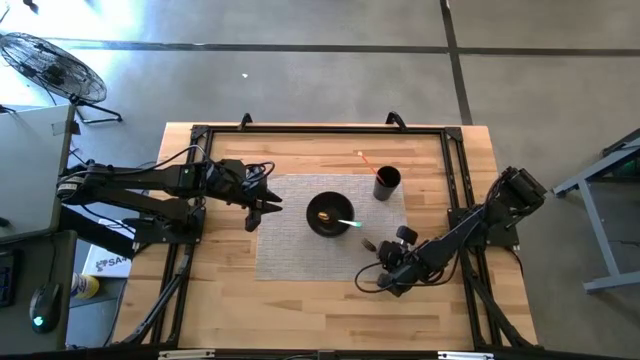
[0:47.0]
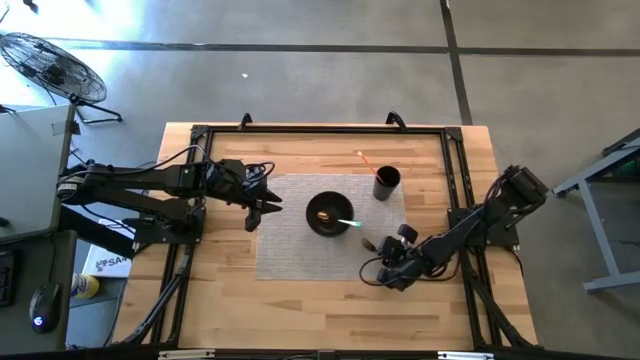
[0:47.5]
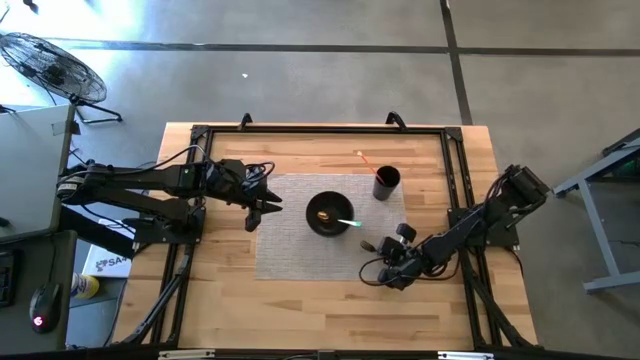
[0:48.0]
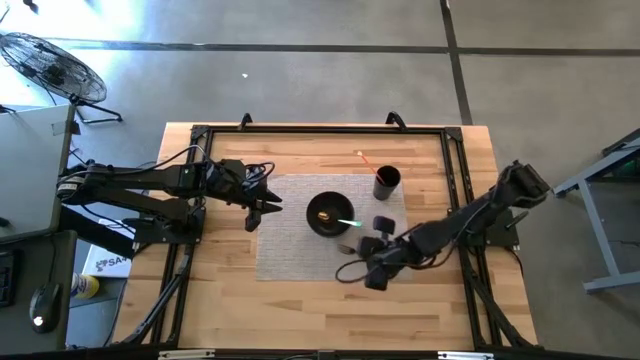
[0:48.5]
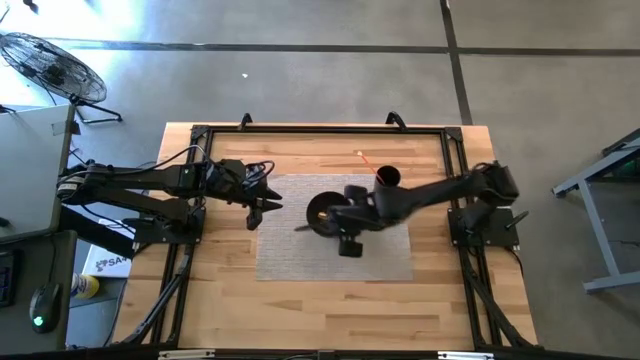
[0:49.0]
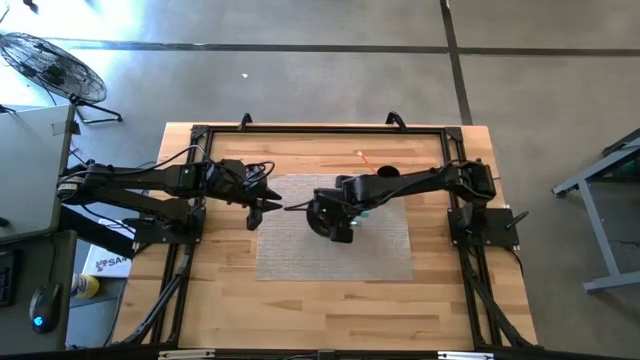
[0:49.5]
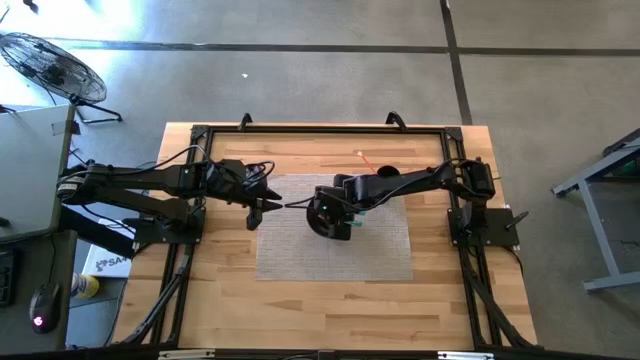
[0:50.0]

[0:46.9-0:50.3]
Task: Pick & Place Utensil
Put the blue fork into the black bowl to the bottom left of the black bowl

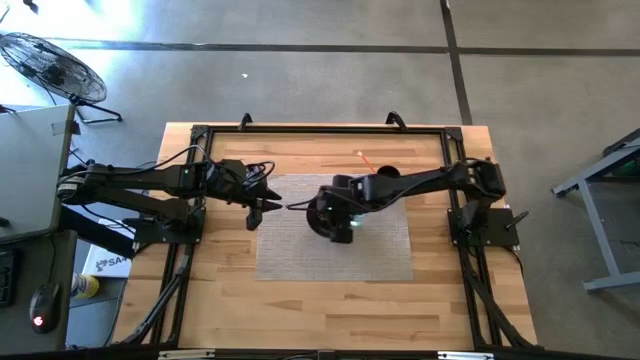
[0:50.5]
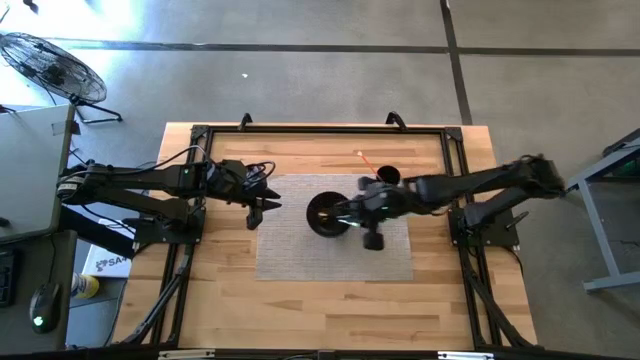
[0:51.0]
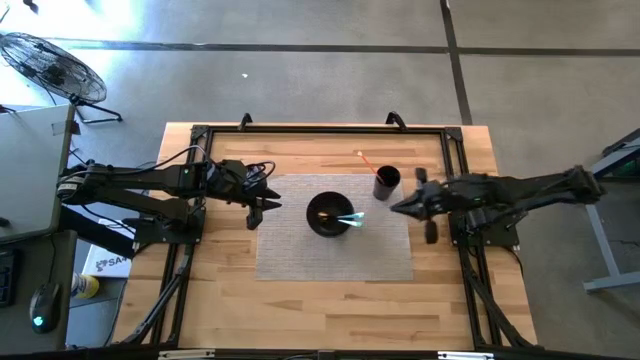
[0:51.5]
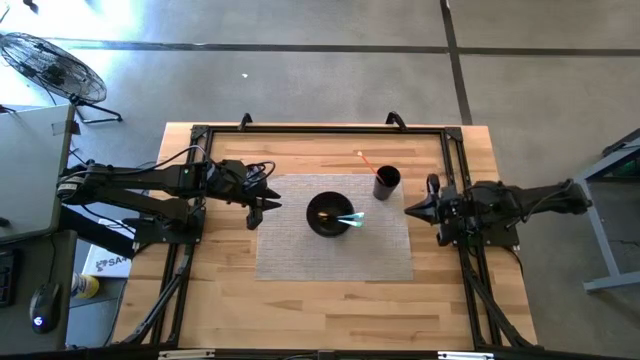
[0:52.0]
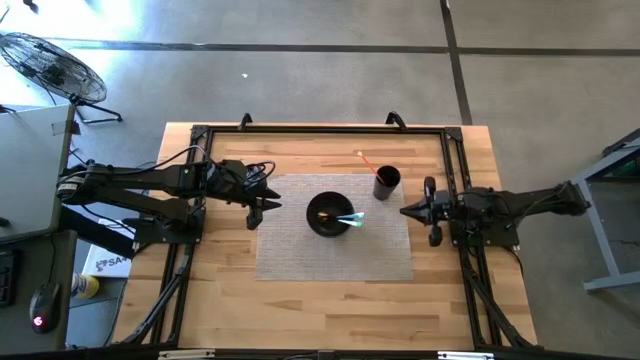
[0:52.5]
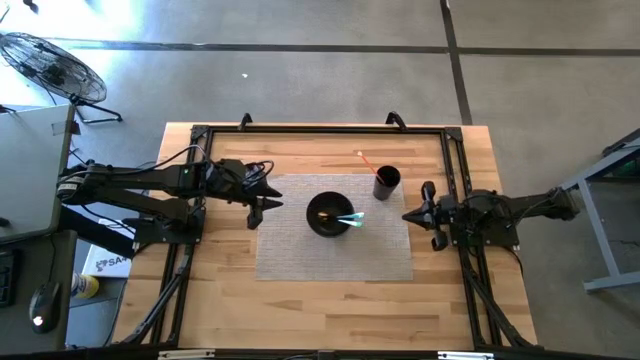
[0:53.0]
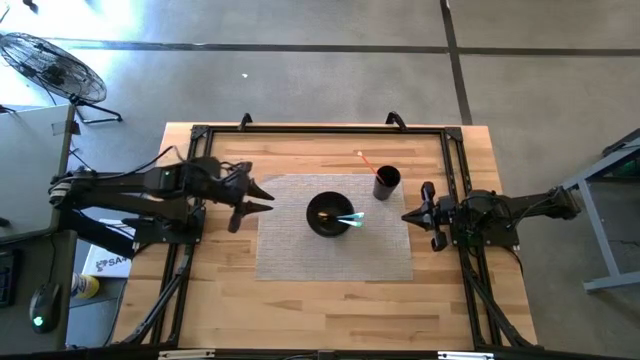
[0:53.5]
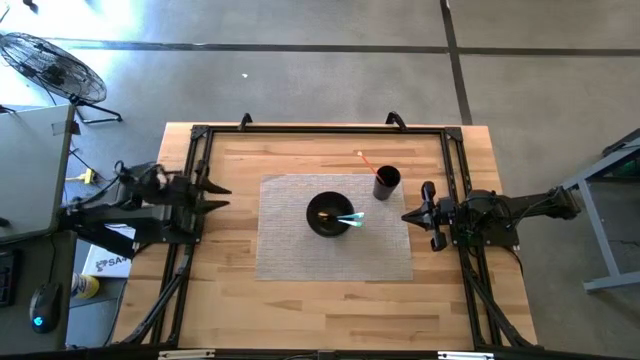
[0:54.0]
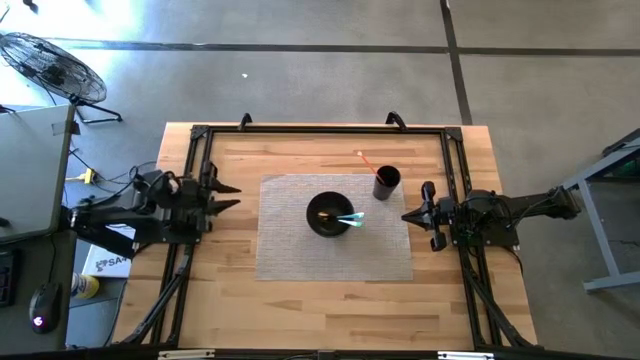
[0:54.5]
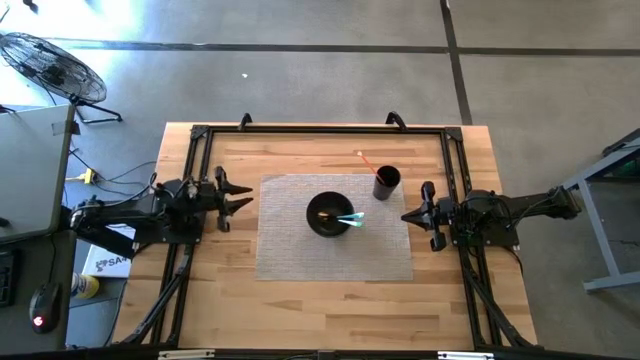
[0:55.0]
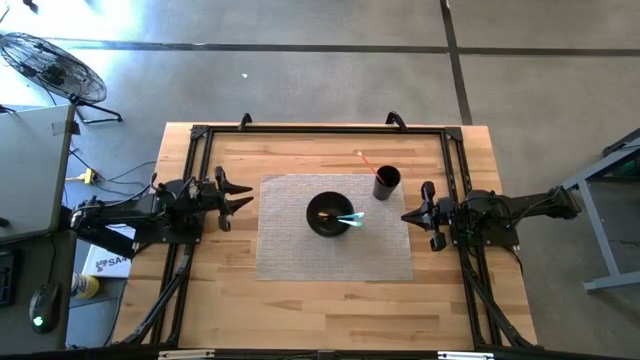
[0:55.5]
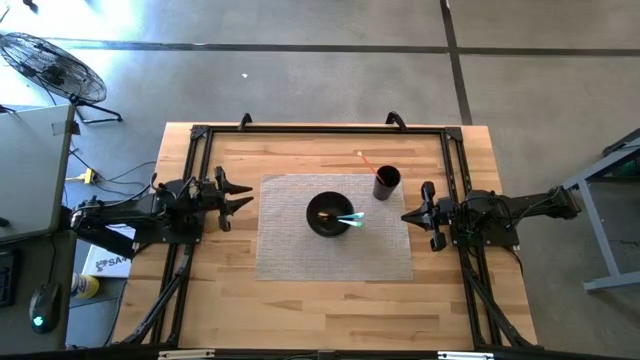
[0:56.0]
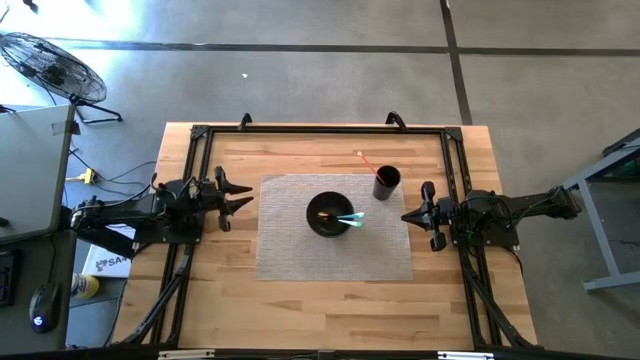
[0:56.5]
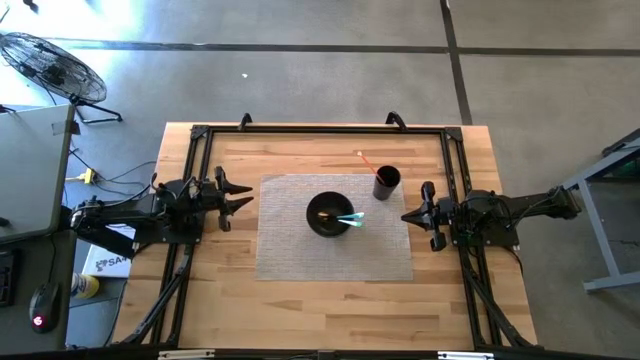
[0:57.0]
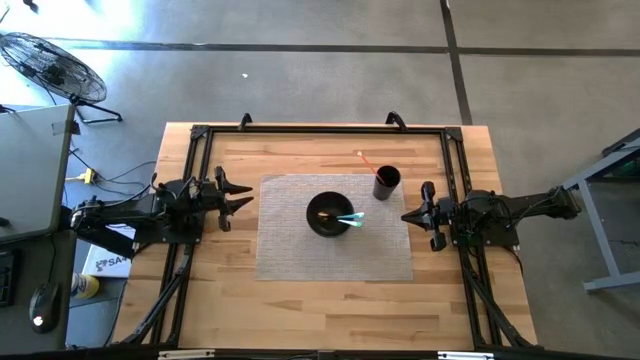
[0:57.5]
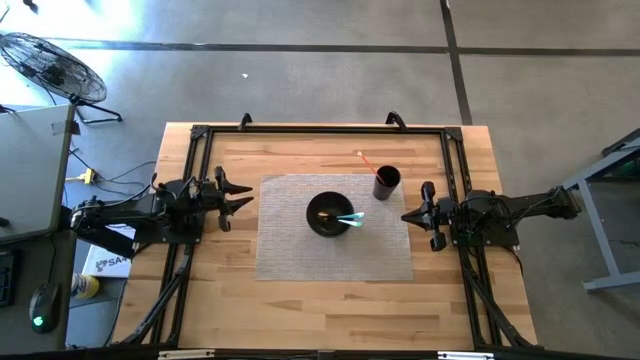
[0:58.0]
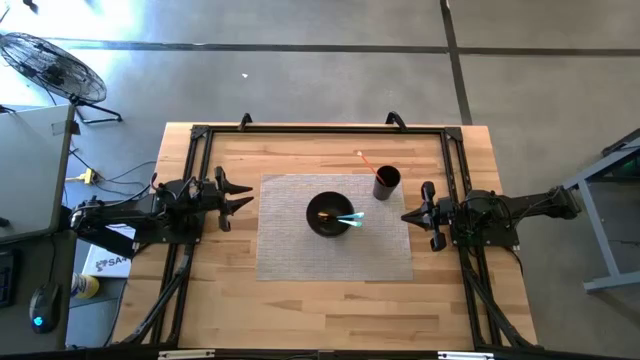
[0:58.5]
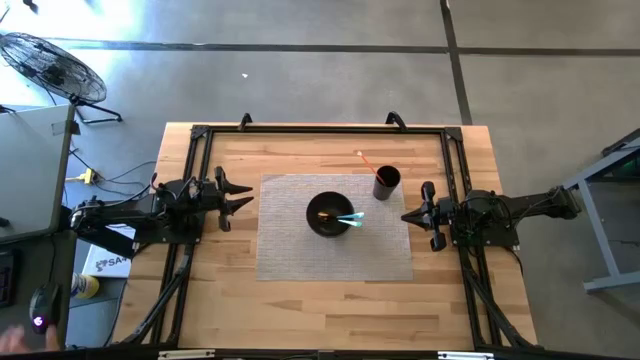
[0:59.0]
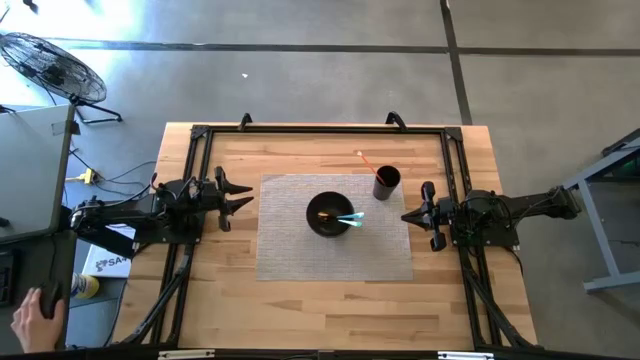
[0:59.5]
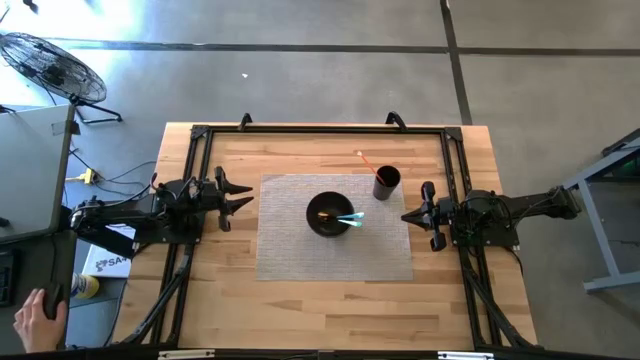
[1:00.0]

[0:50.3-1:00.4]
Return to Home Position

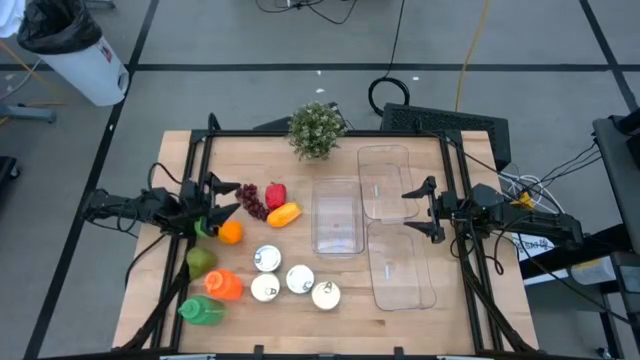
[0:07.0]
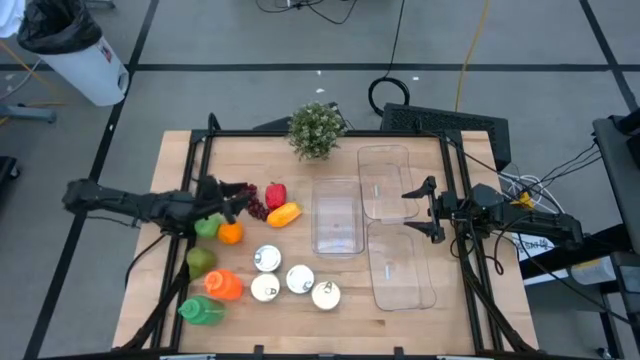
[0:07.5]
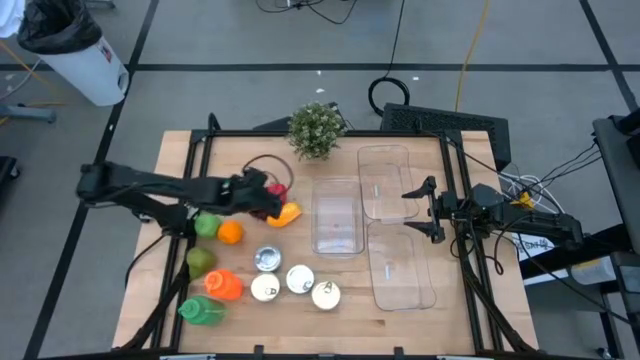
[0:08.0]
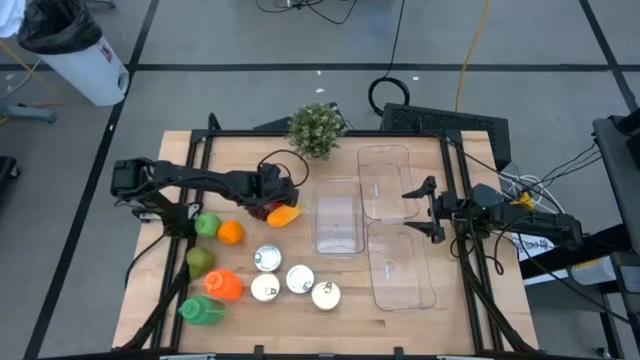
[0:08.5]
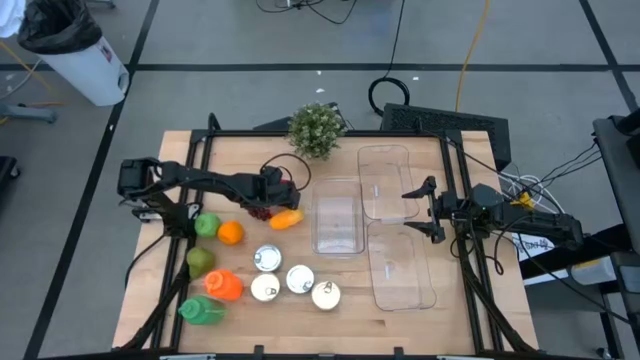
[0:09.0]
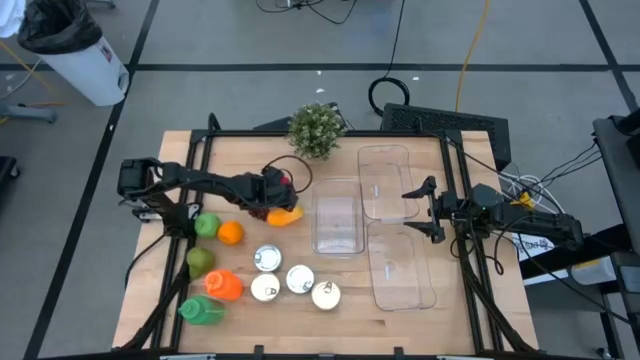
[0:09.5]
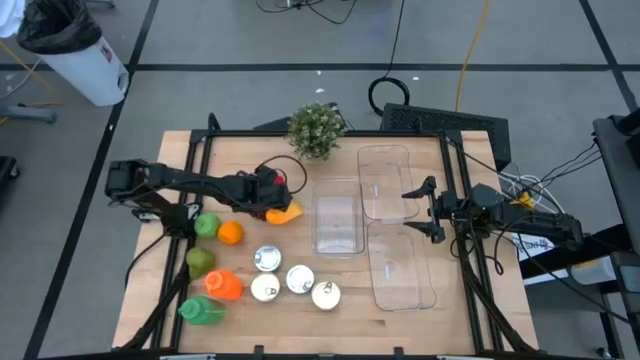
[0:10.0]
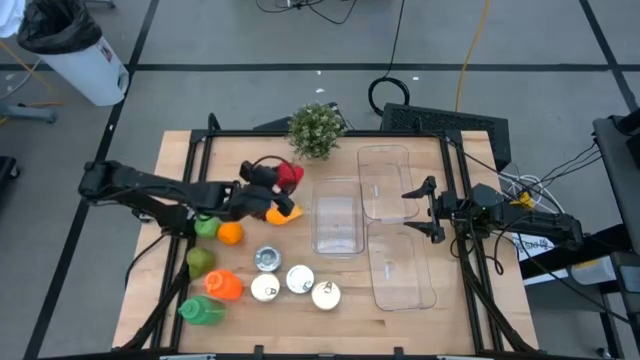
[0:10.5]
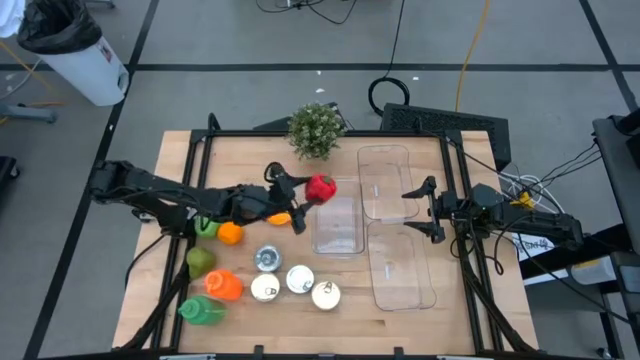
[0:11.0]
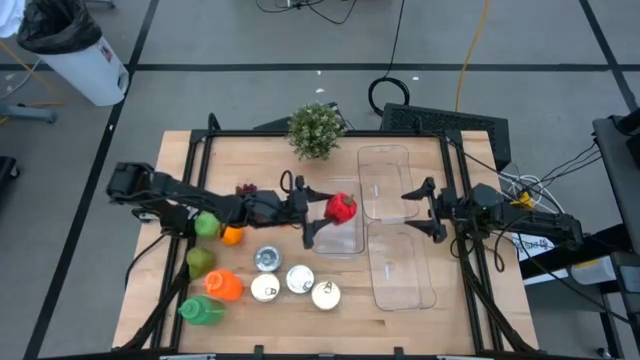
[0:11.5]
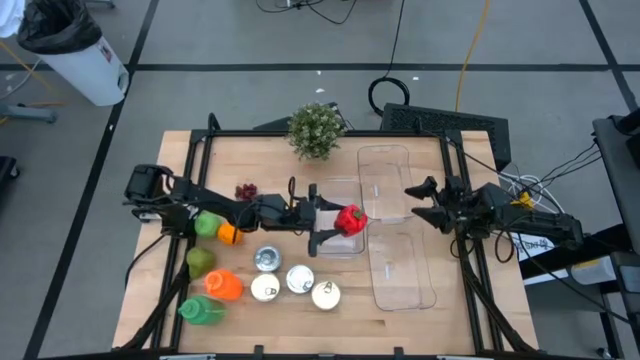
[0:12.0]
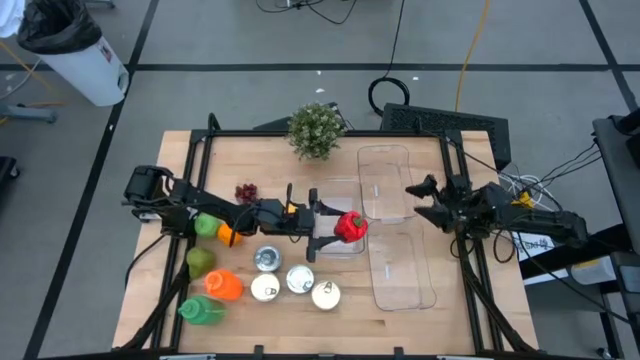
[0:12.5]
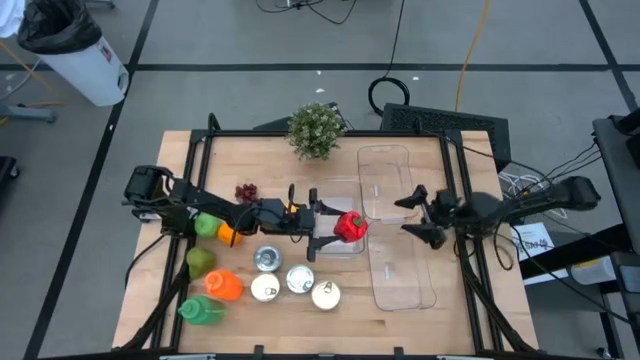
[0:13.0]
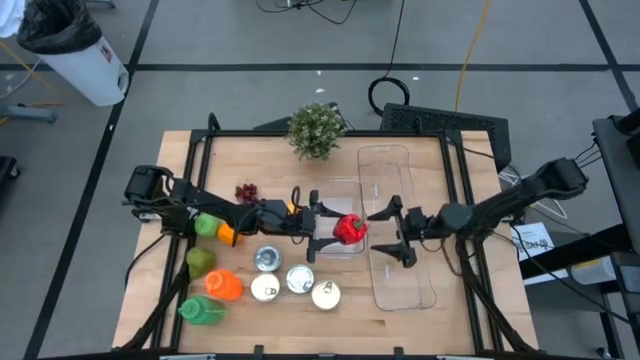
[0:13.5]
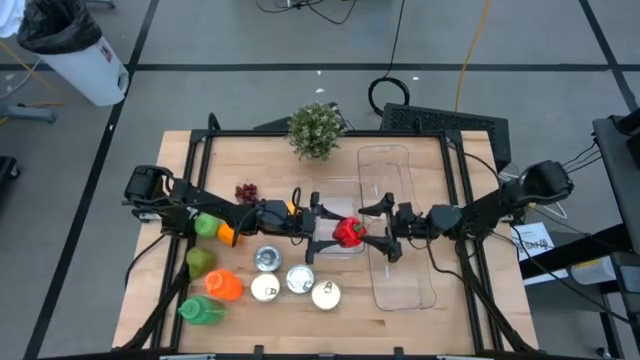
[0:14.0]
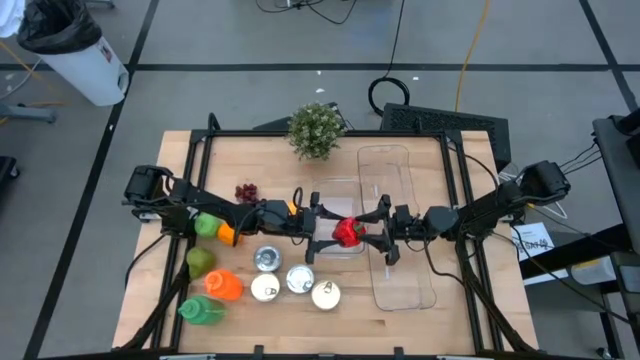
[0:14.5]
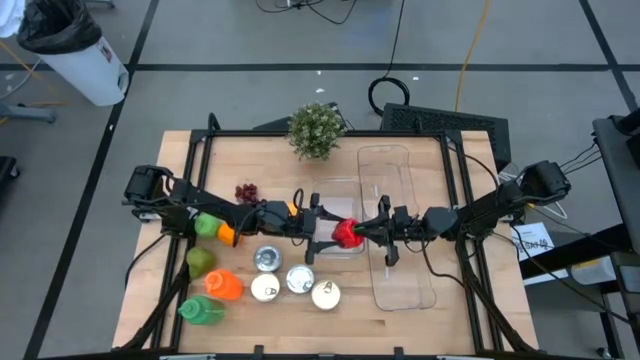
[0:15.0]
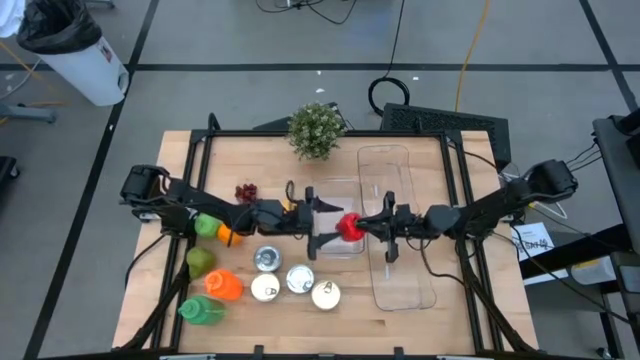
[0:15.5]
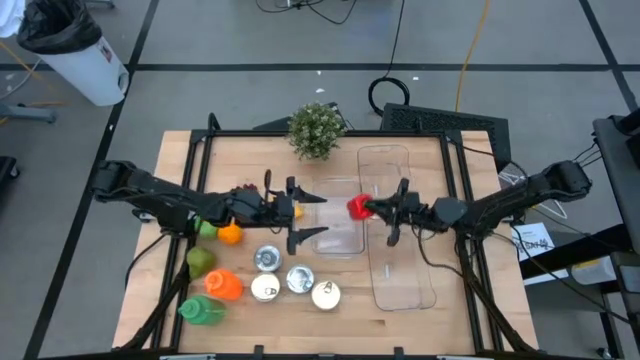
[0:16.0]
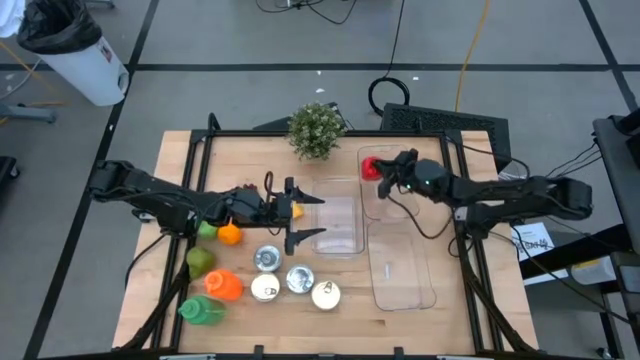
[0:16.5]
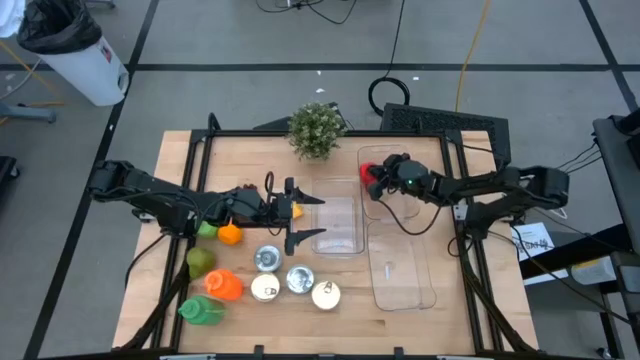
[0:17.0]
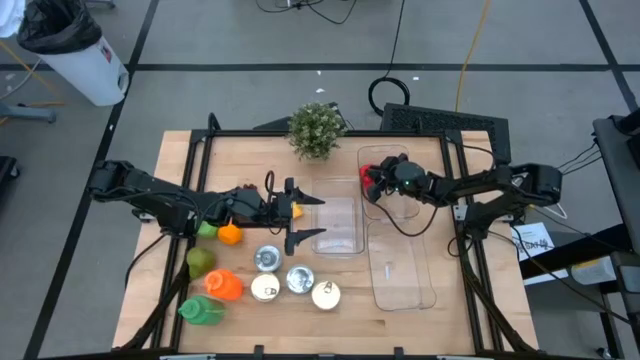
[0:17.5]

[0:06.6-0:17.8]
Task: Pick & Place Food Item
Put the red bell pepper into the top transparent bin
